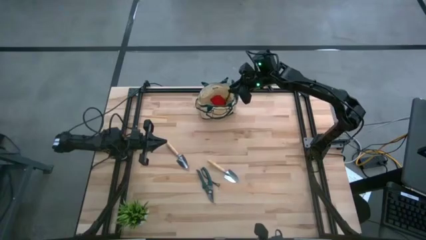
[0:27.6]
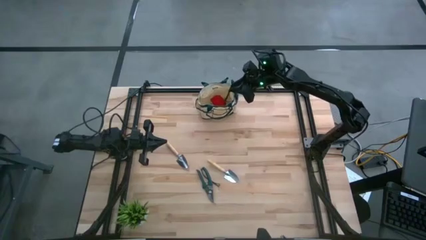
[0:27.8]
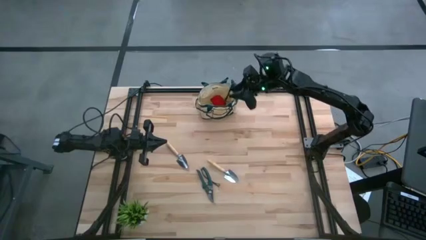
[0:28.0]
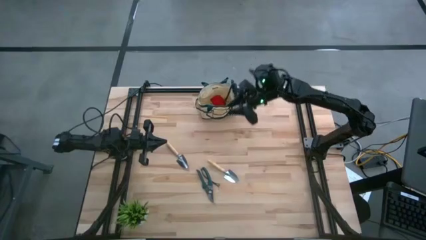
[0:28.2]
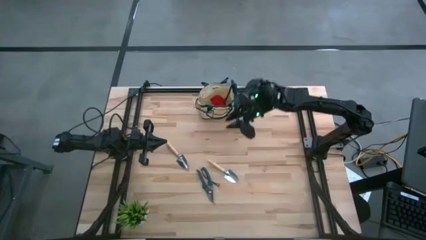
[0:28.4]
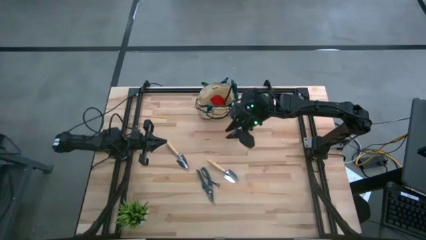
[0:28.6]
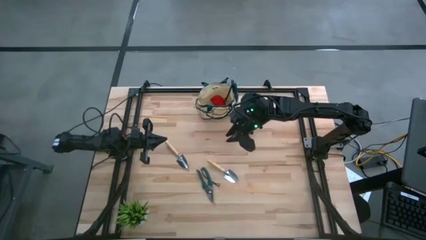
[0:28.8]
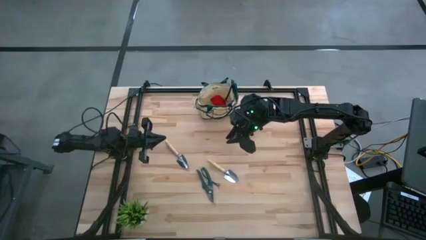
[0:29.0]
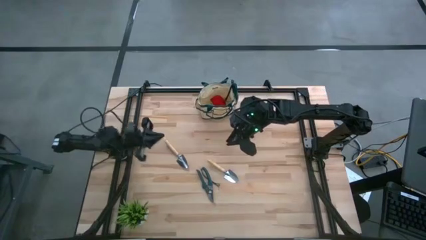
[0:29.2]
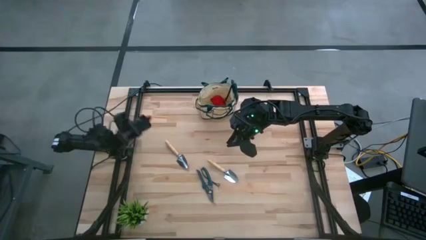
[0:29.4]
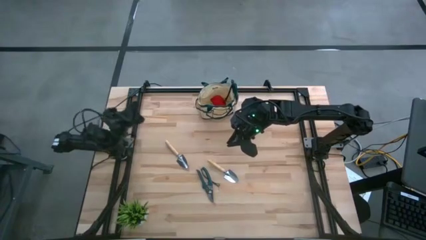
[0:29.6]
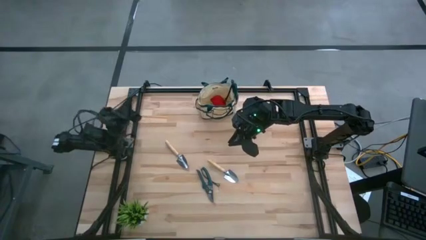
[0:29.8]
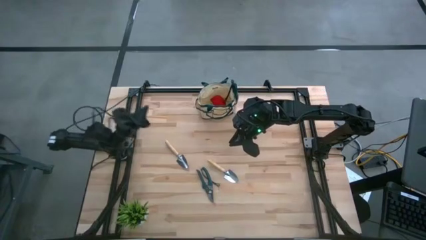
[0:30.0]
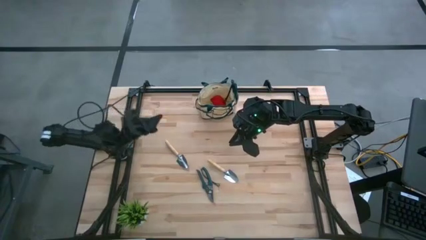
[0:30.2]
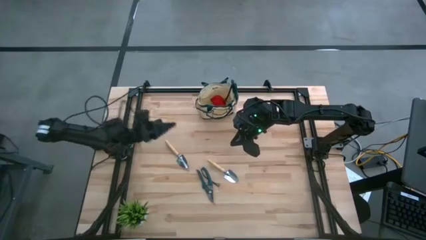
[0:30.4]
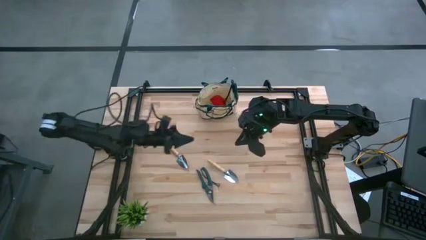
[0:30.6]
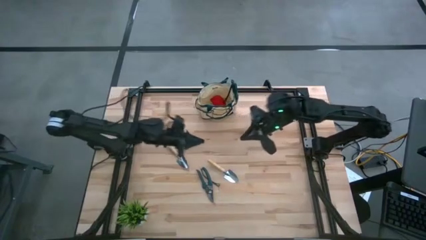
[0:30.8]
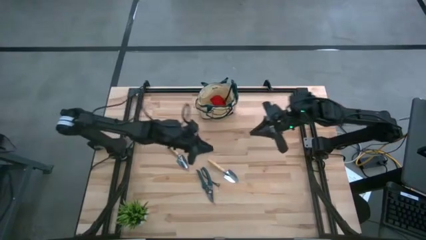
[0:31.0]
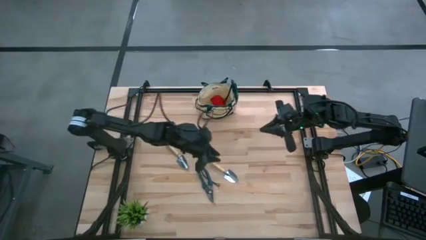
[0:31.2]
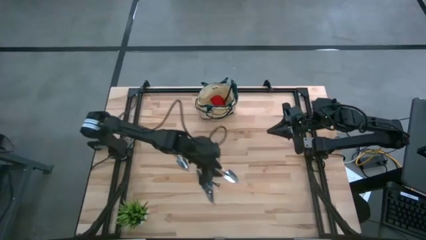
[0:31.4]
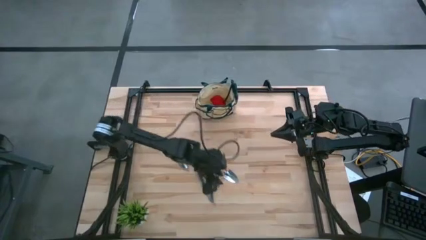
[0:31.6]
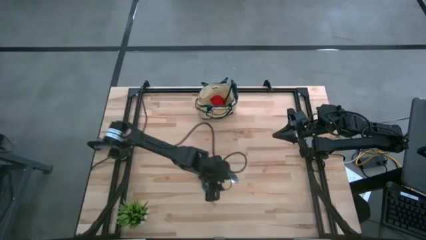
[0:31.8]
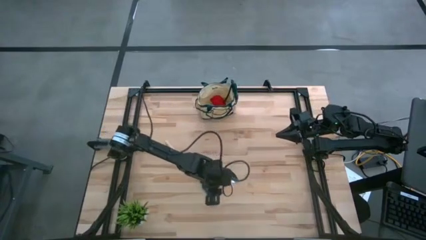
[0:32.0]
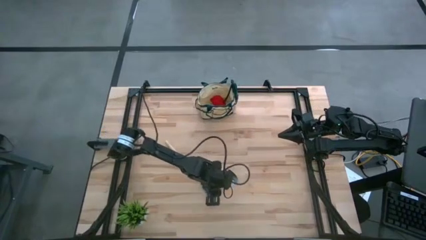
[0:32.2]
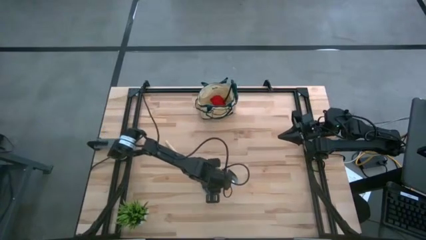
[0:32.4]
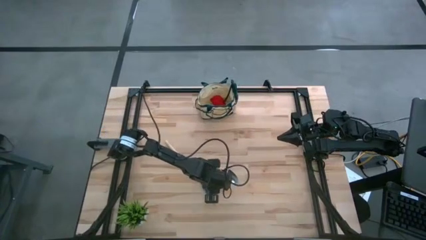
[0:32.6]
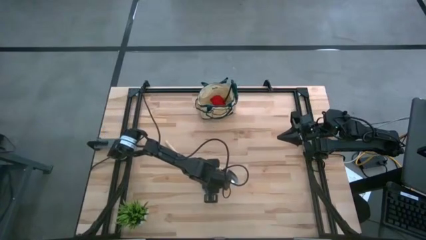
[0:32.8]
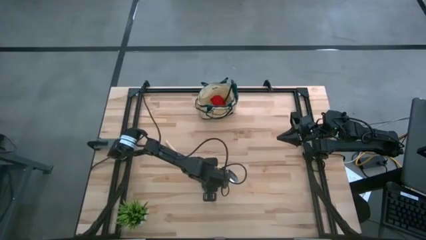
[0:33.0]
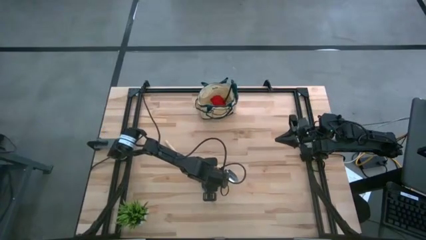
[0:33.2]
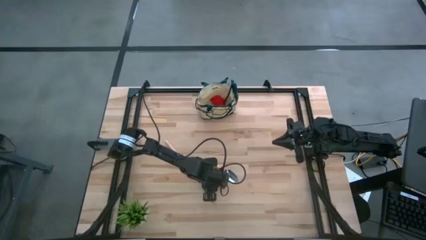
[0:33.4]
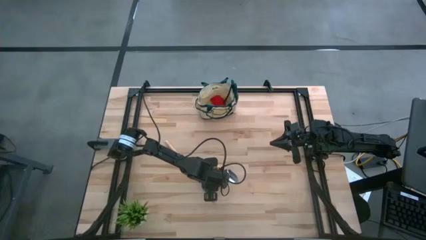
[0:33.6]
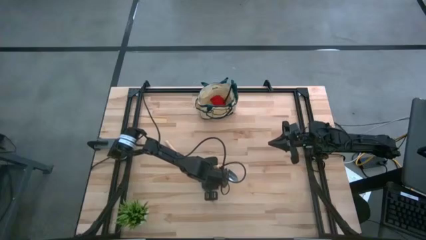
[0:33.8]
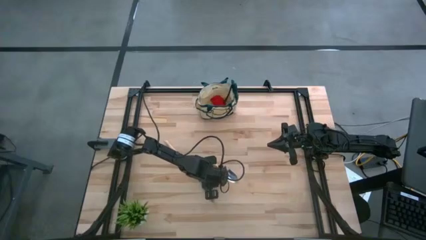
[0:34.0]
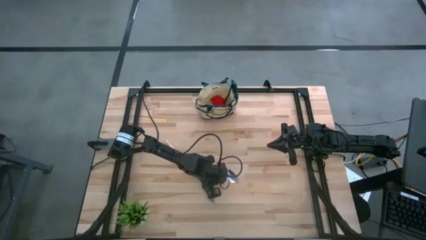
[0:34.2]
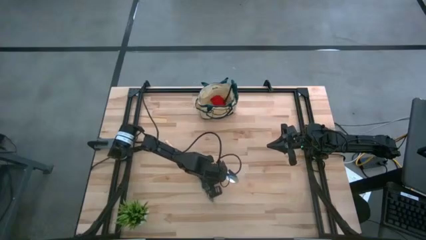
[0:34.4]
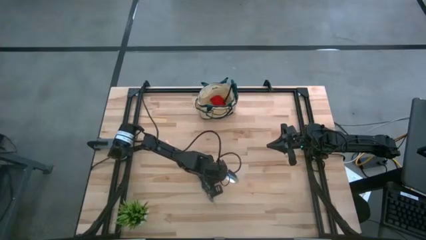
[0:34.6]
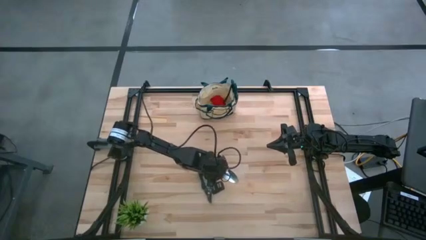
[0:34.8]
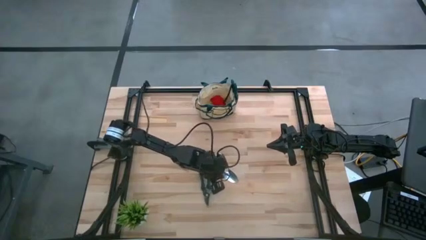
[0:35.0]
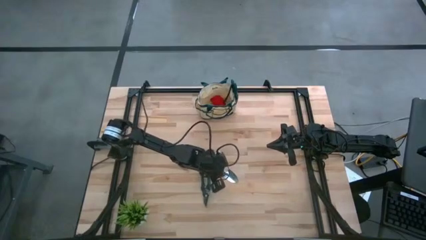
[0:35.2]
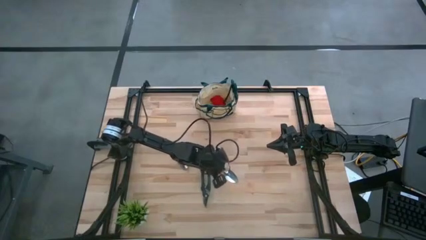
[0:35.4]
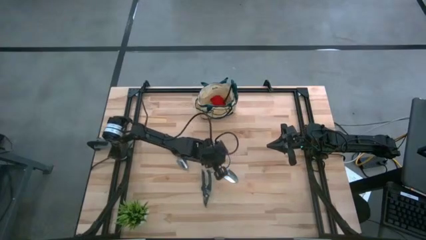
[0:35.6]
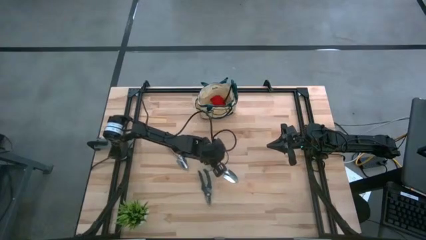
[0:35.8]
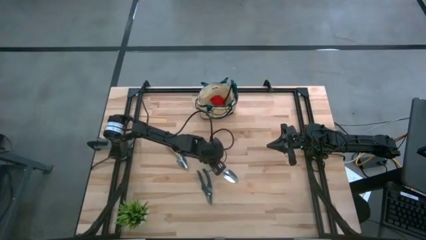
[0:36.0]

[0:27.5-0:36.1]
Task: Pick & Place Garden tools in Gardening bag
Put the shear scissors into the gardening bag

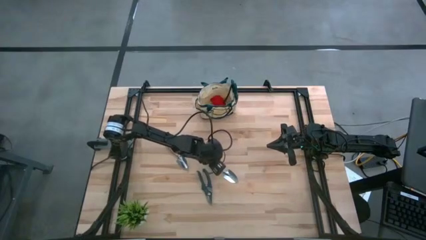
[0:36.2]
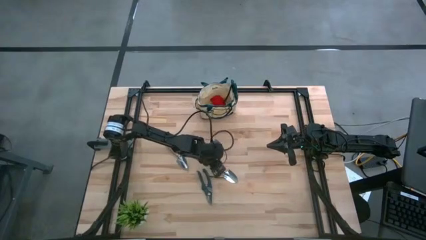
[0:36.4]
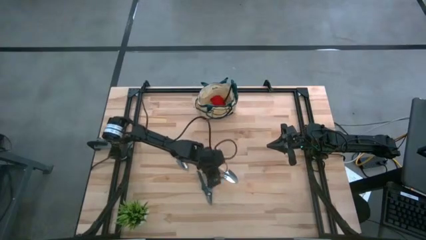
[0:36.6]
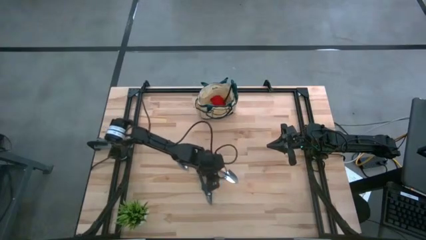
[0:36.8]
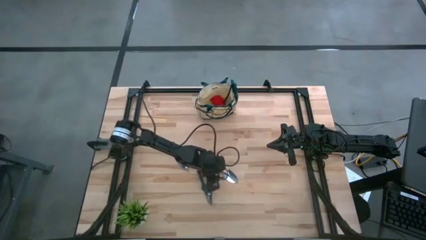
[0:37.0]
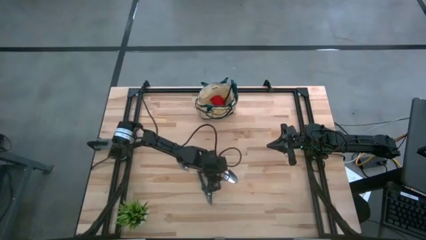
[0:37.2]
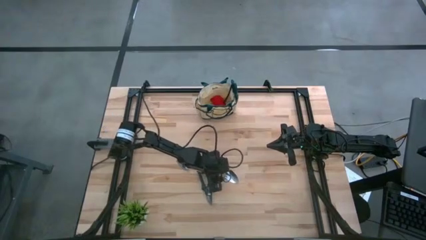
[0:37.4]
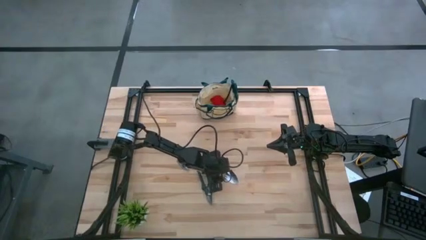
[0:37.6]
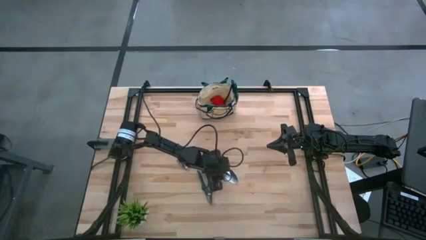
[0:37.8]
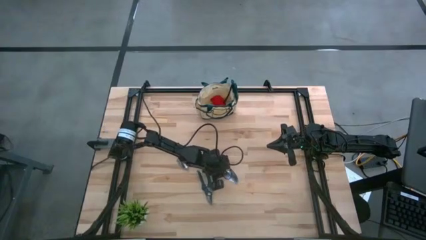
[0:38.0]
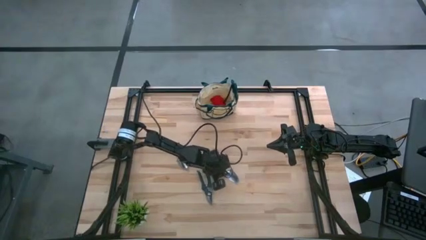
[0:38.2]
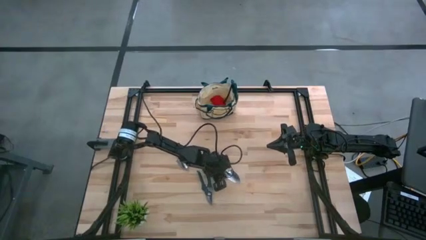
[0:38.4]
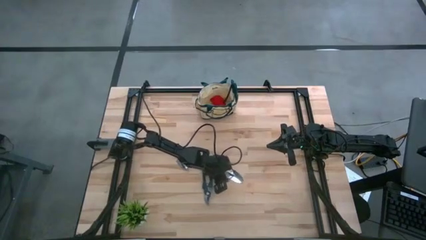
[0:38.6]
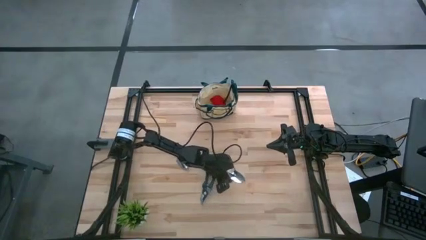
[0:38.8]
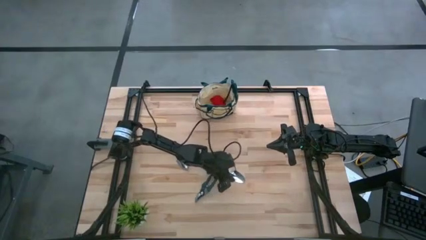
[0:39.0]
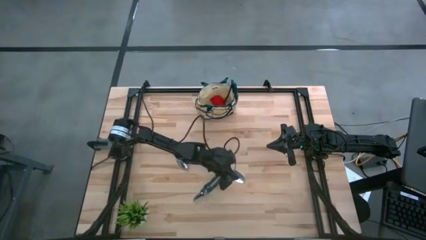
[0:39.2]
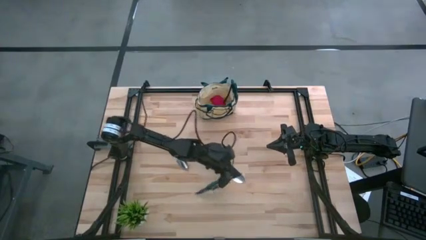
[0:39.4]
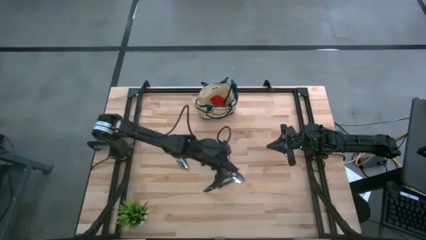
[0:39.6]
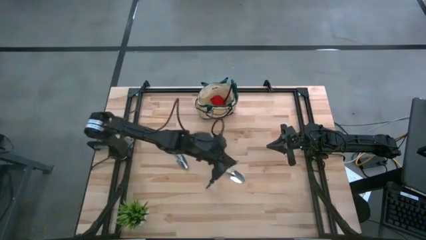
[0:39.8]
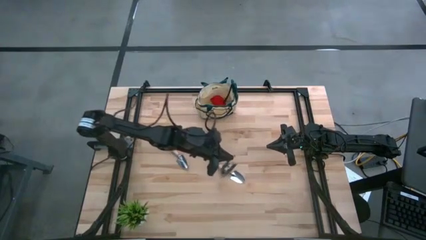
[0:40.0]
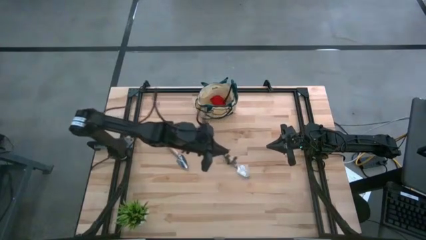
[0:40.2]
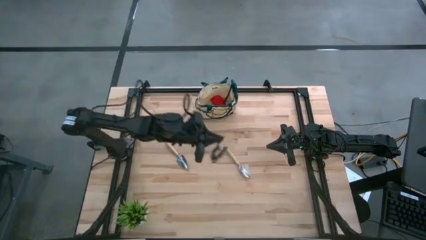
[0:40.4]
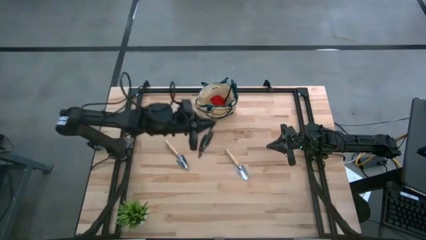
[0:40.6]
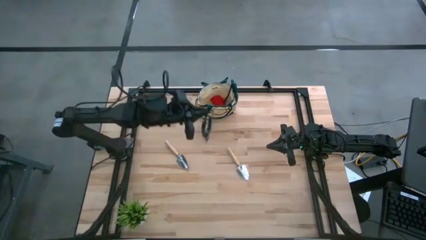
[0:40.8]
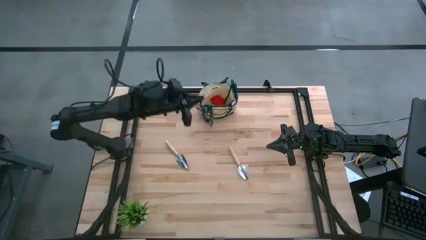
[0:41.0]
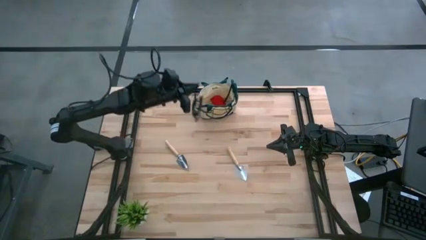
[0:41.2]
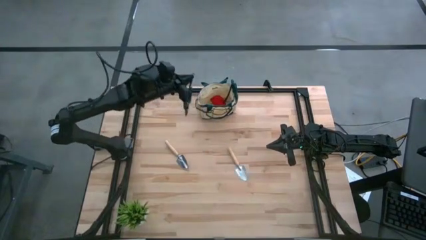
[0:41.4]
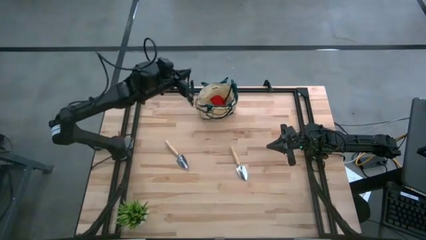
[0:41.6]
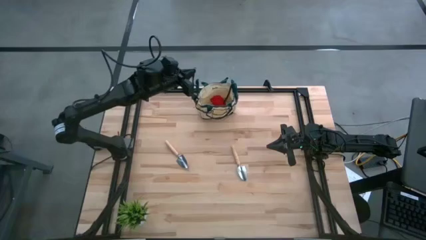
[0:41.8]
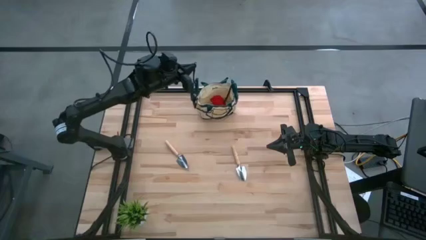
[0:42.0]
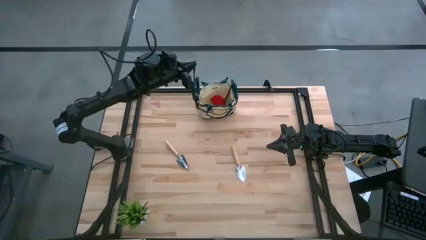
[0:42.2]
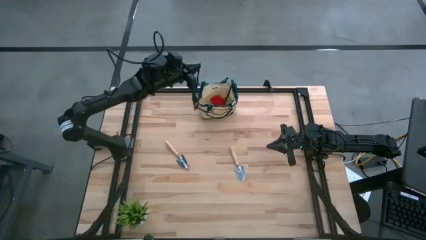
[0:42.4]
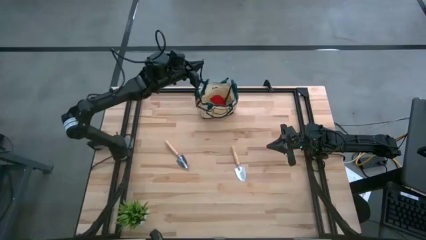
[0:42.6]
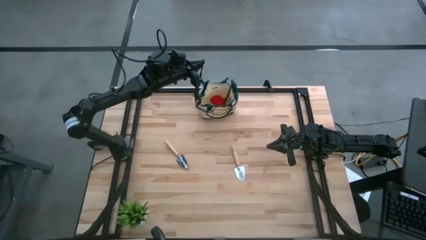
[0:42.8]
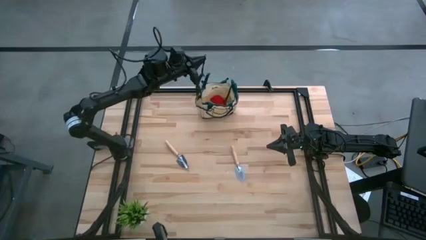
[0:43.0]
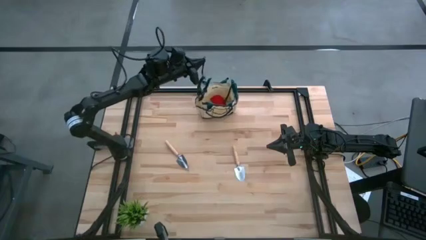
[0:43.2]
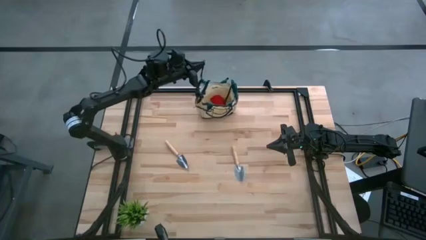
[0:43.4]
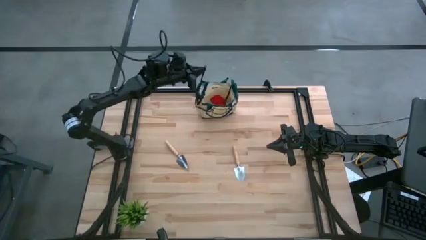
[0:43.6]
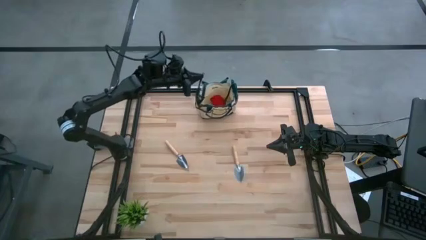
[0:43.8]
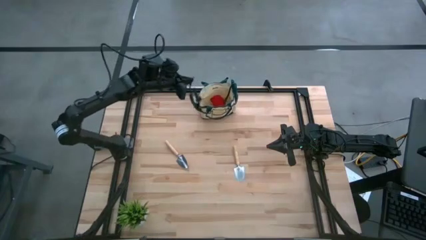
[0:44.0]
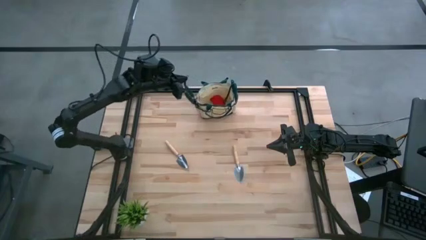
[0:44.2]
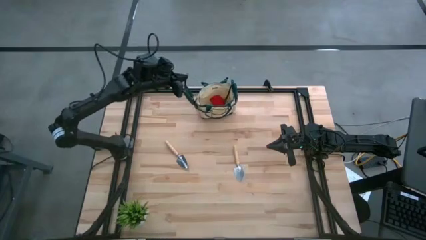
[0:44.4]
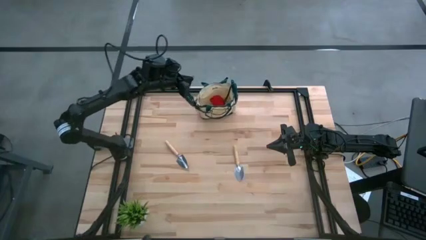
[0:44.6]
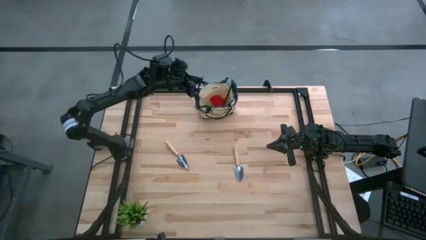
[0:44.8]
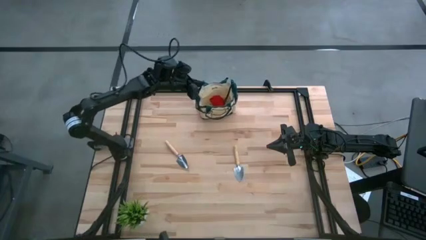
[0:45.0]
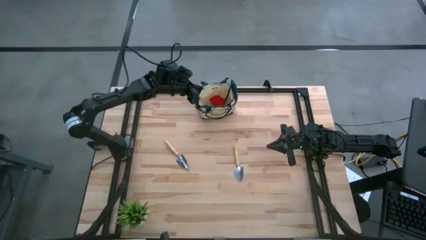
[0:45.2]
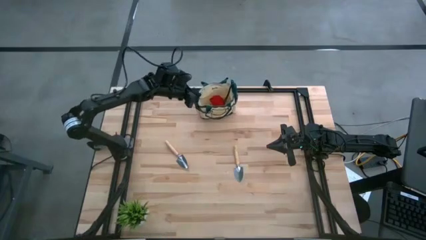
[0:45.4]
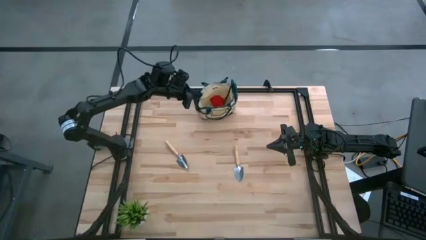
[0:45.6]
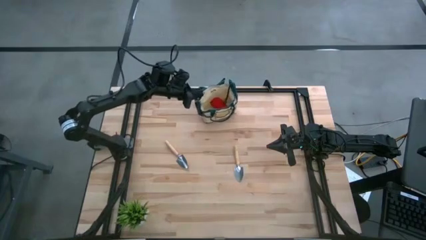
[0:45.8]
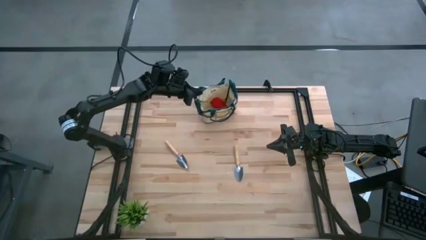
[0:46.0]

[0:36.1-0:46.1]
Put the shear scissors into the gardening bag
